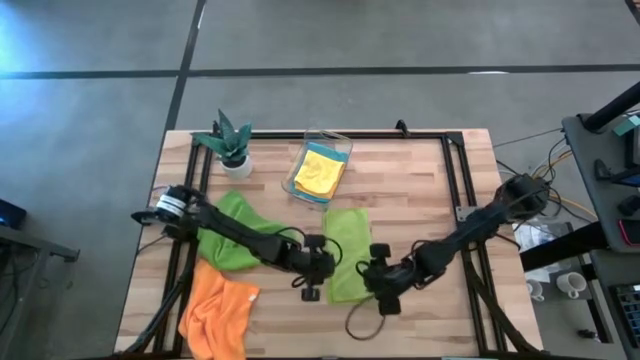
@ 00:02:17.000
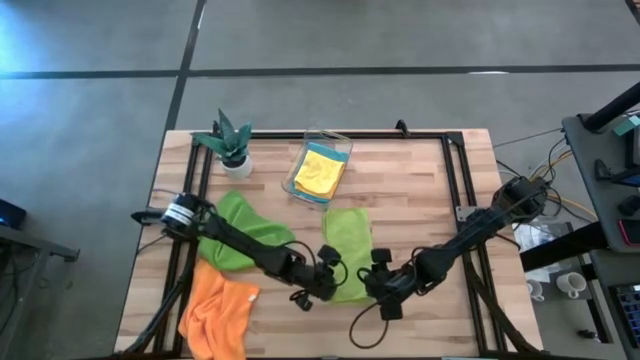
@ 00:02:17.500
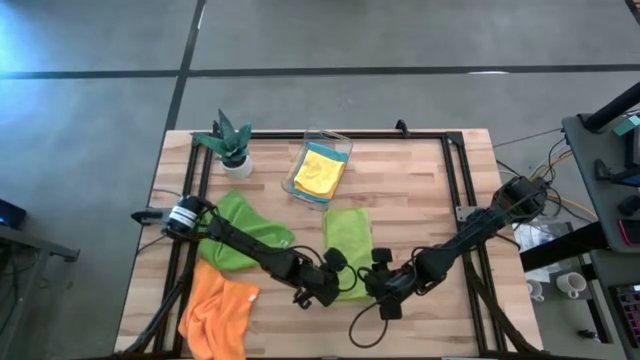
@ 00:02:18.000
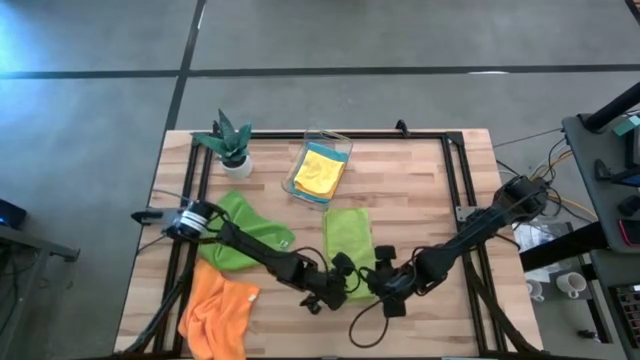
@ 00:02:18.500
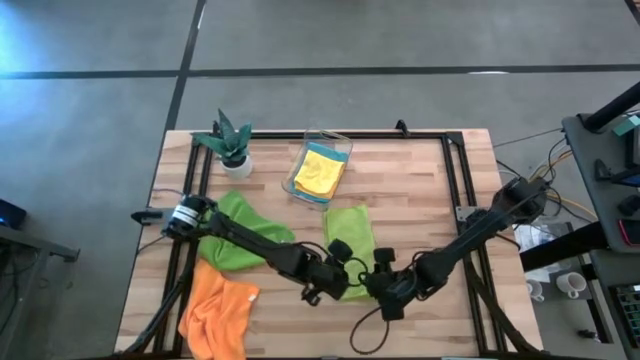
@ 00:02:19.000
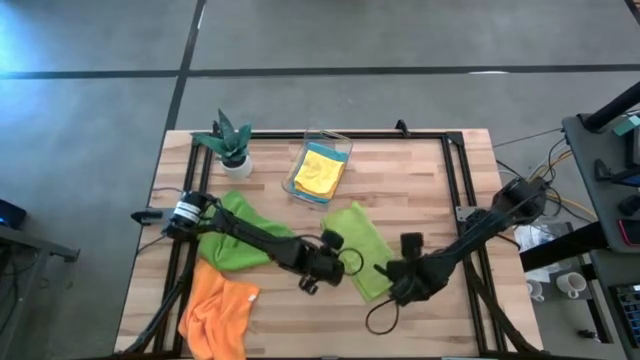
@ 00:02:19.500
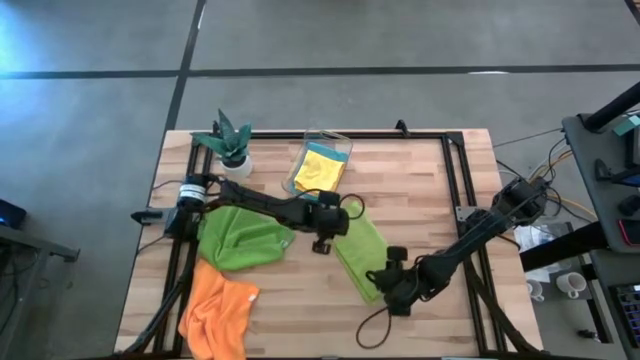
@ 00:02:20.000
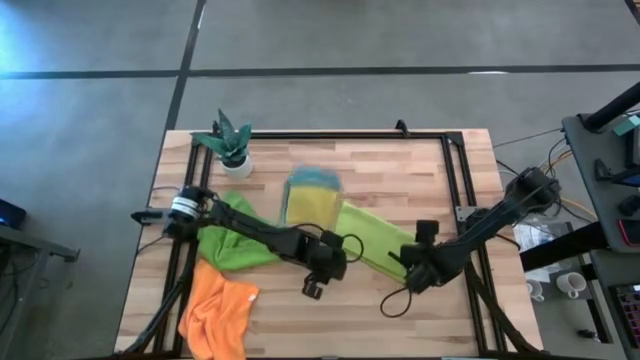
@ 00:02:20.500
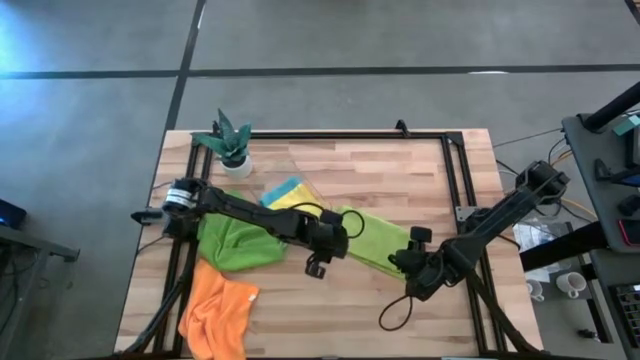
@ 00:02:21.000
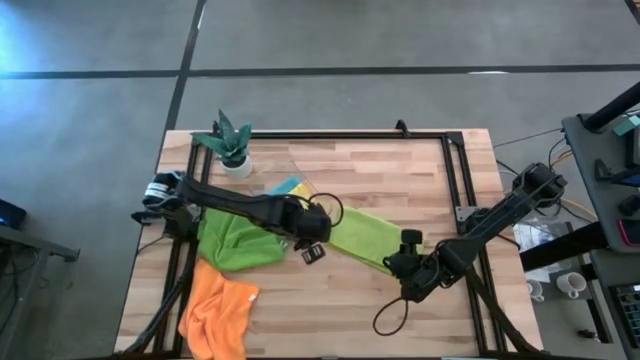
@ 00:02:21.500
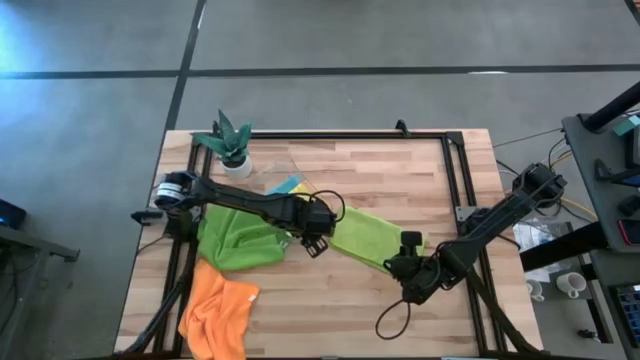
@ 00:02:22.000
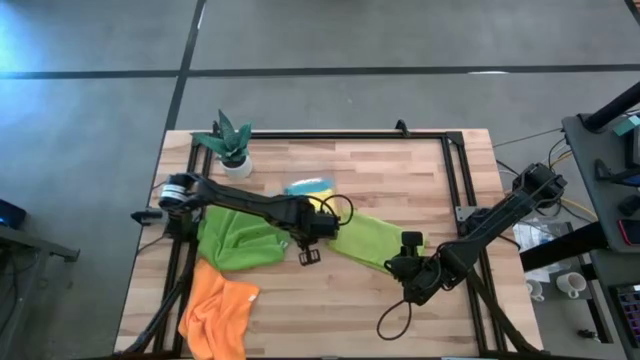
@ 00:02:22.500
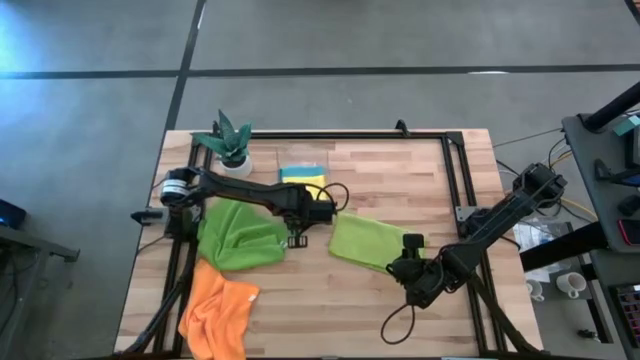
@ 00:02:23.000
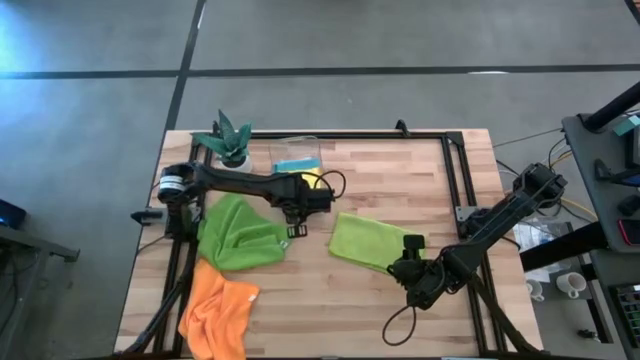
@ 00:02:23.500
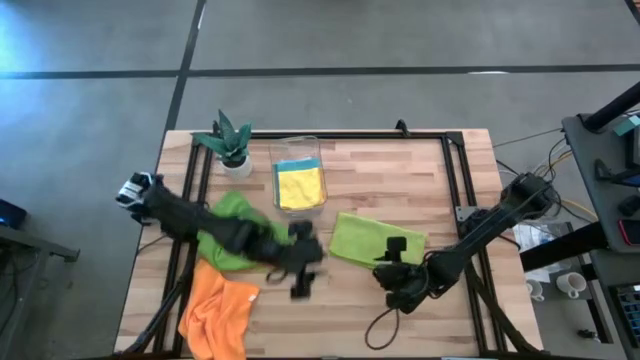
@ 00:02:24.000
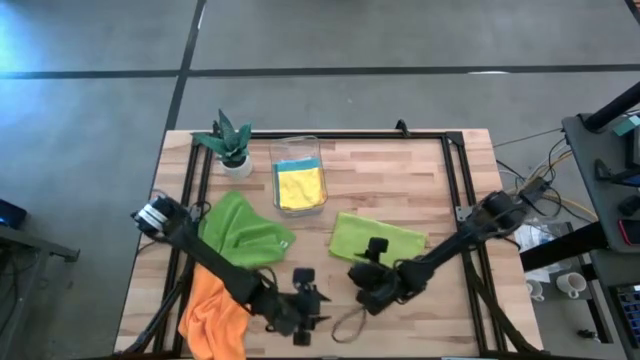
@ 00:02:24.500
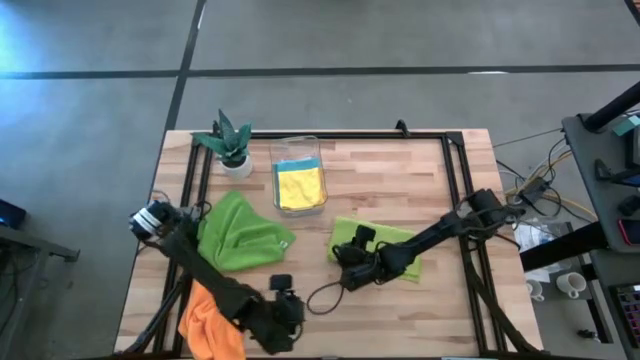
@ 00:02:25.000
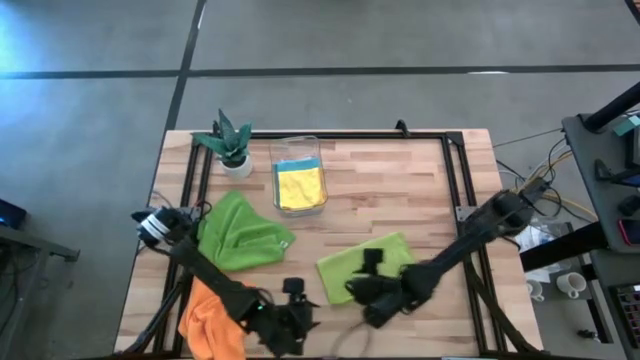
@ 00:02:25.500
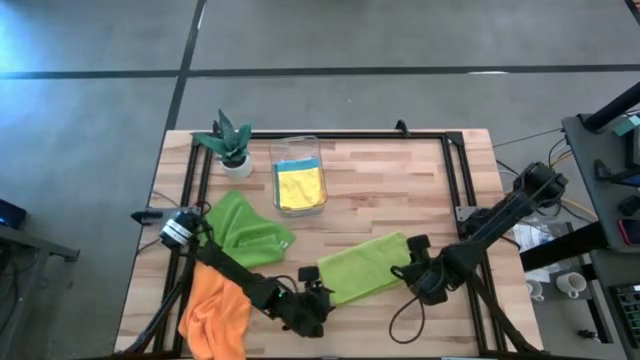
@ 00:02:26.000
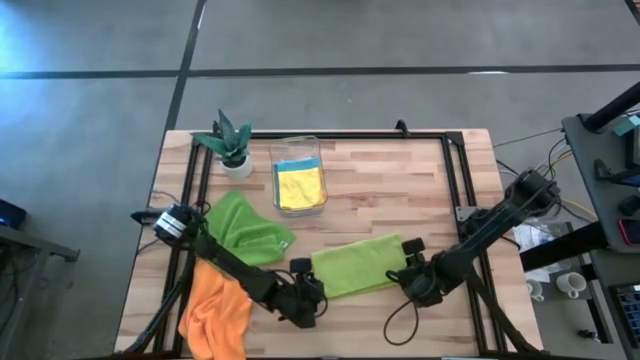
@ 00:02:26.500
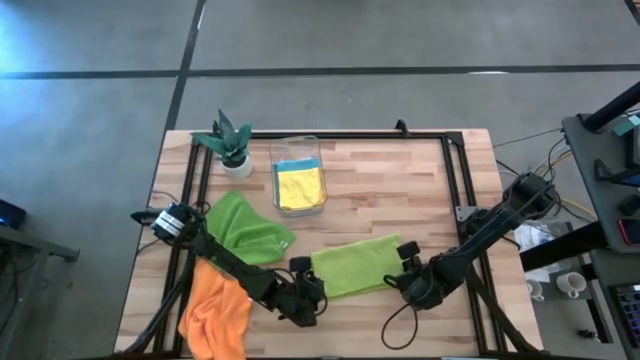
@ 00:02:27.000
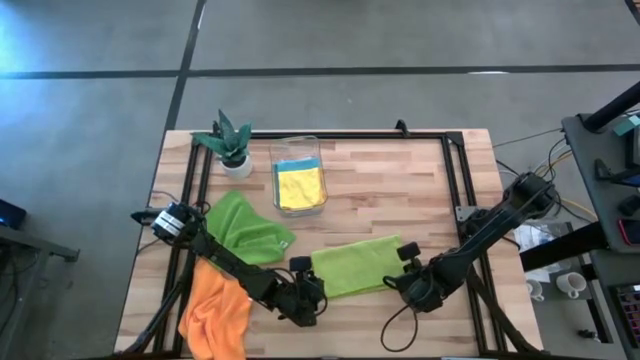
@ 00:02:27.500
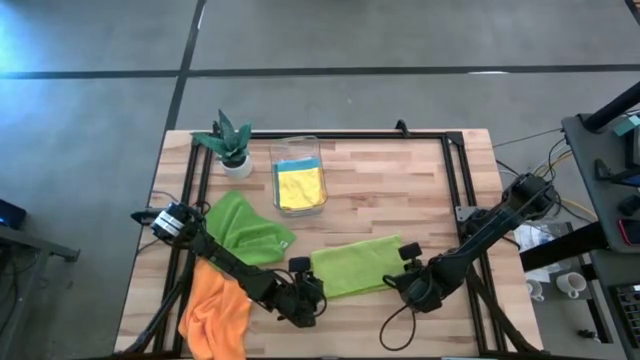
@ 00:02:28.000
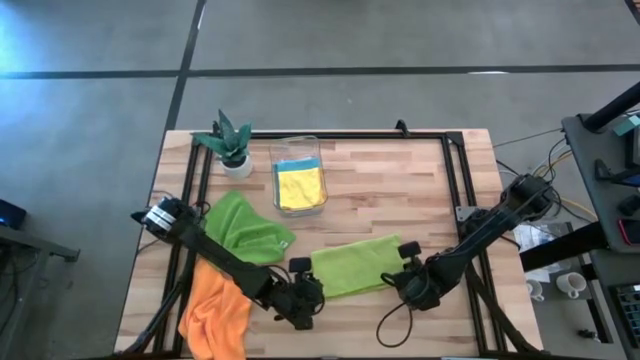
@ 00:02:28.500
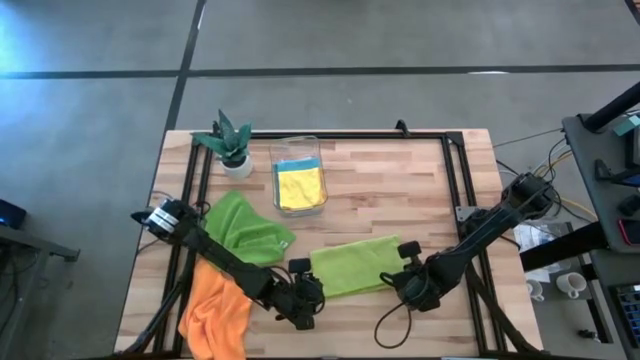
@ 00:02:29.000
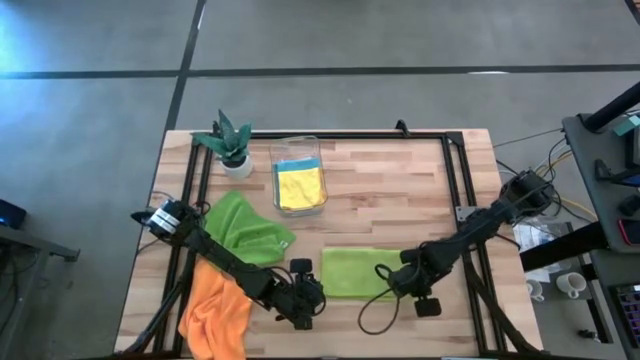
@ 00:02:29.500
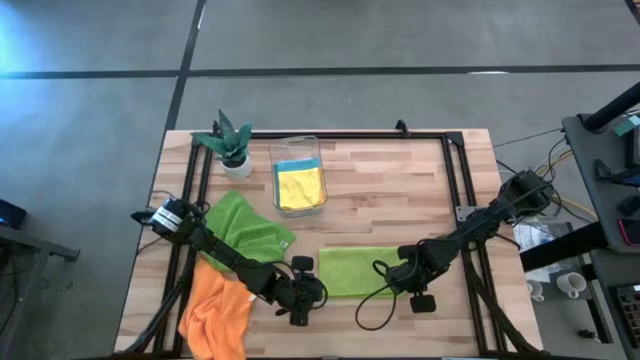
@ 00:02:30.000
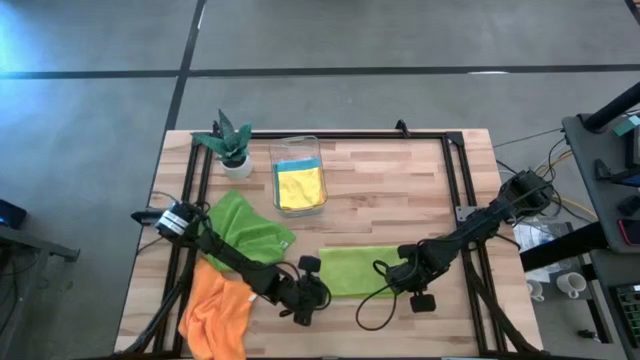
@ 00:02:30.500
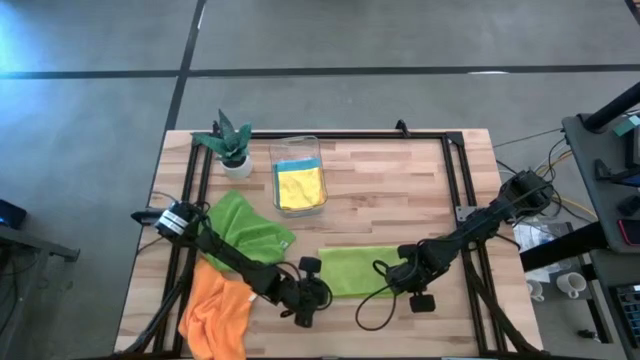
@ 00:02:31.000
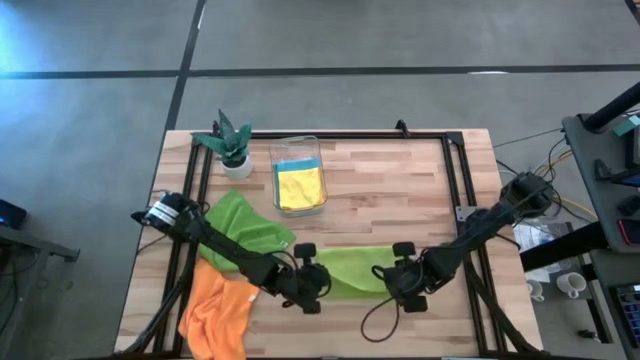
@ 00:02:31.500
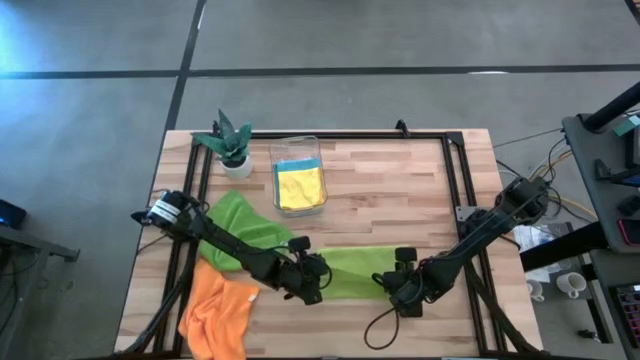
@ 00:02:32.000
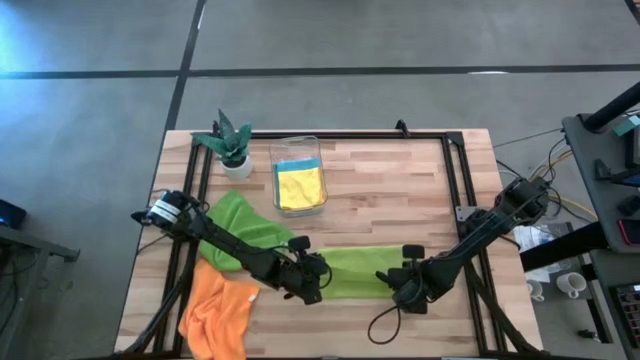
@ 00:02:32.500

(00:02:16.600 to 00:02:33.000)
Task: Fold microfiber towels
Fold the light green microfiber cloth

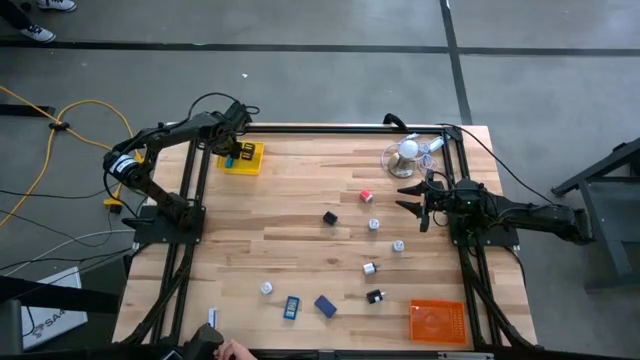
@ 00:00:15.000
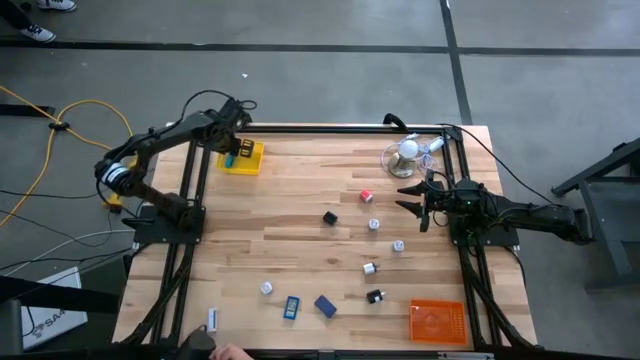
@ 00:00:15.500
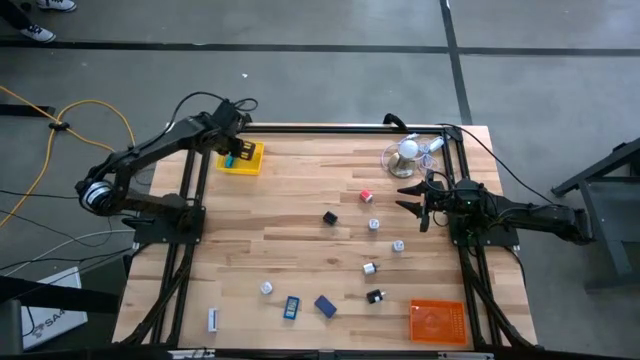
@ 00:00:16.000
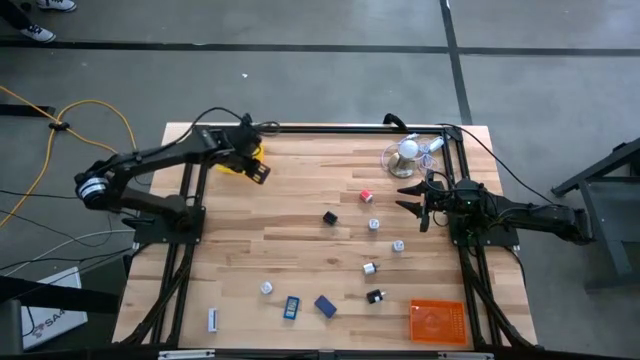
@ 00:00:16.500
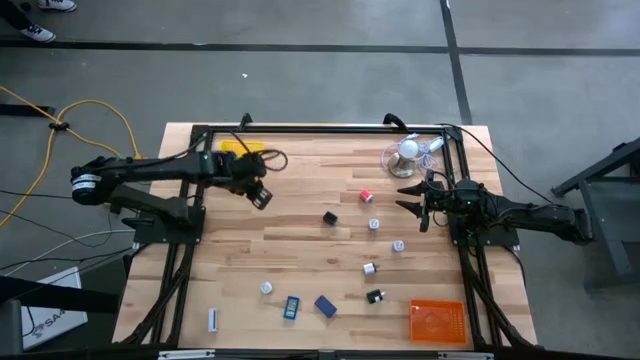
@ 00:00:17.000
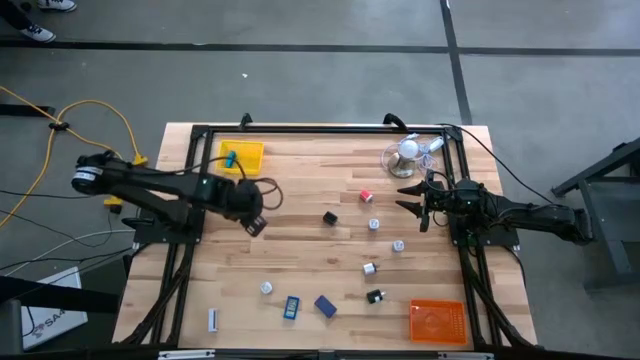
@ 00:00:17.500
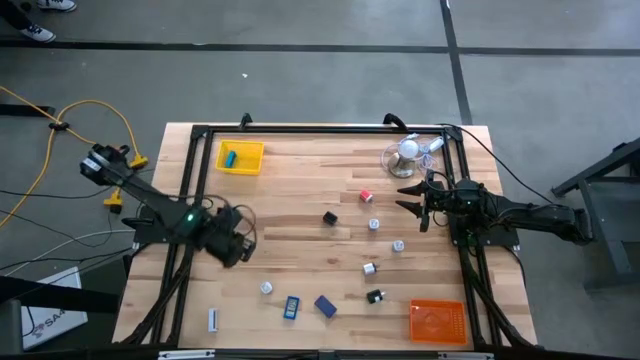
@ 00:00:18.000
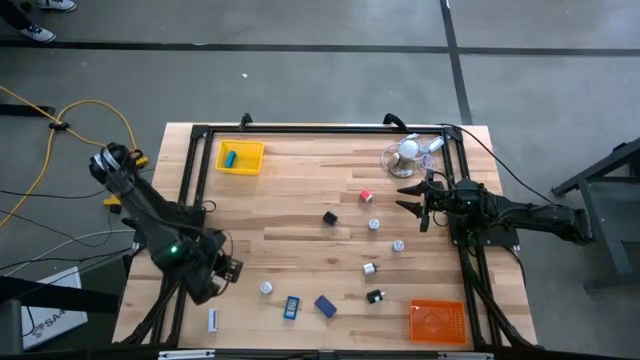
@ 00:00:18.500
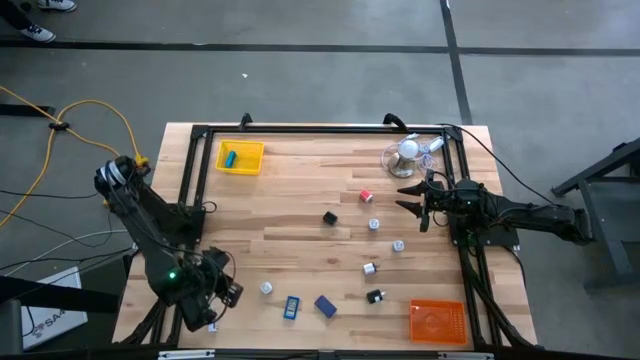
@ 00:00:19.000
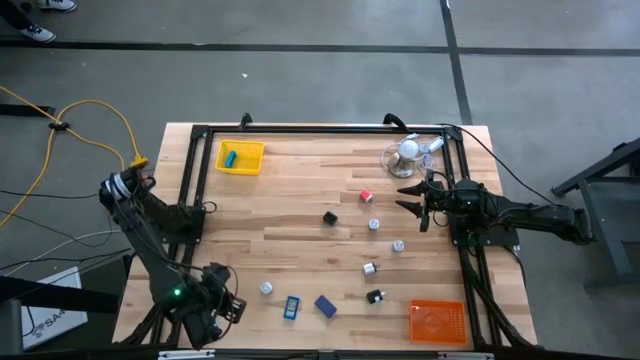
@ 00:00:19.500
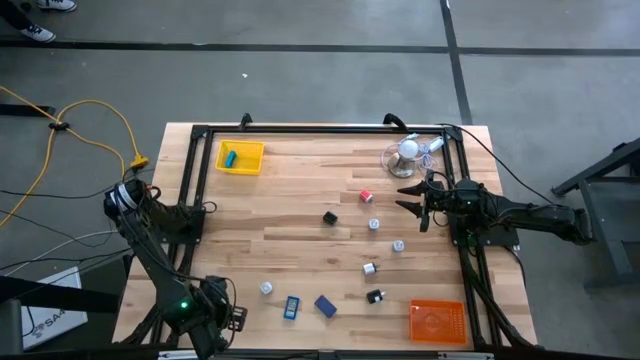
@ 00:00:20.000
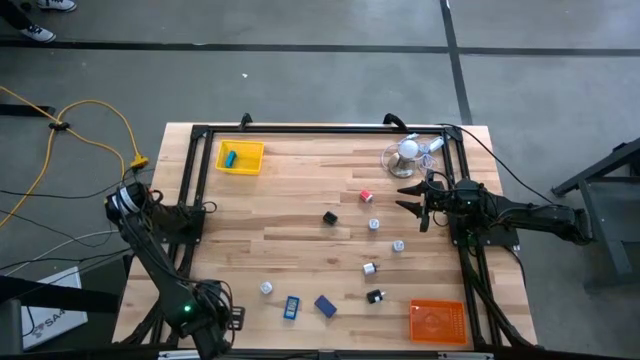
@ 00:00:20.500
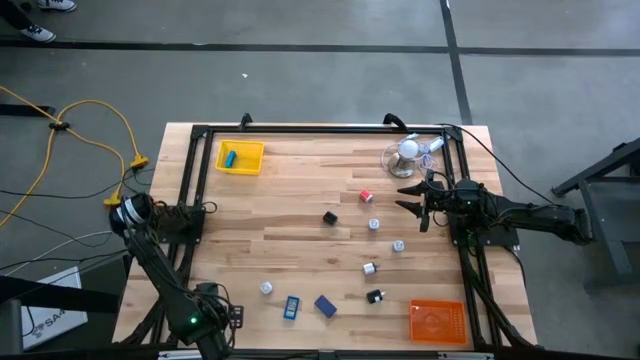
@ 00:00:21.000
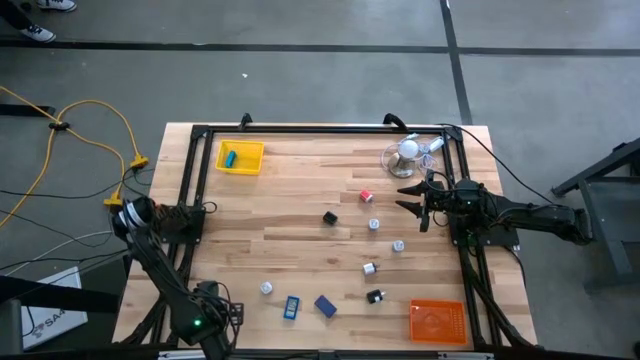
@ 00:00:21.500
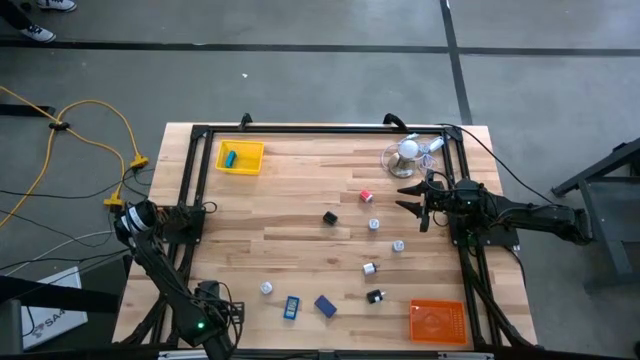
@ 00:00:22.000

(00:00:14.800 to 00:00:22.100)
Task: Pick & Place Office items
Put the white digital timer into the yellow bin
